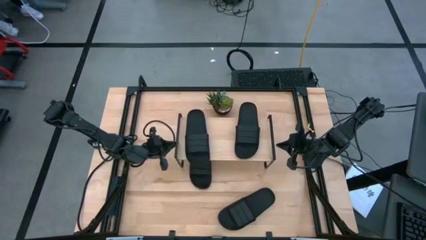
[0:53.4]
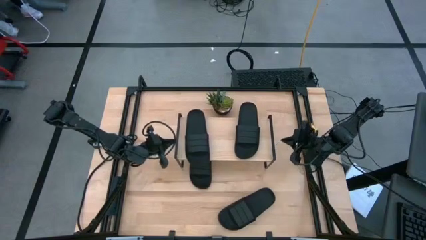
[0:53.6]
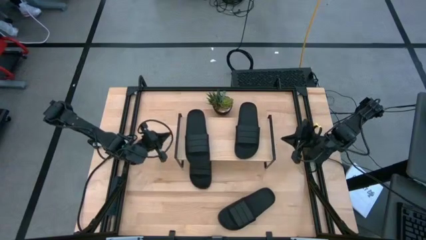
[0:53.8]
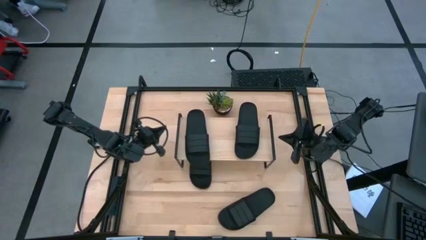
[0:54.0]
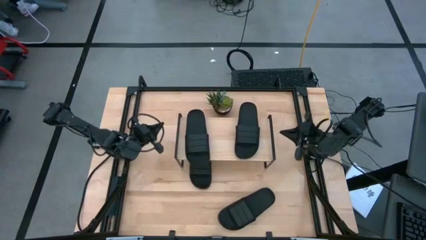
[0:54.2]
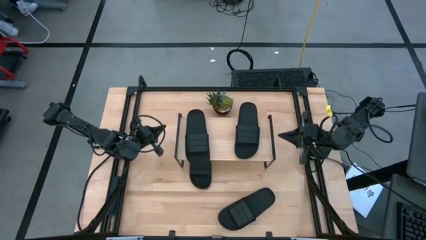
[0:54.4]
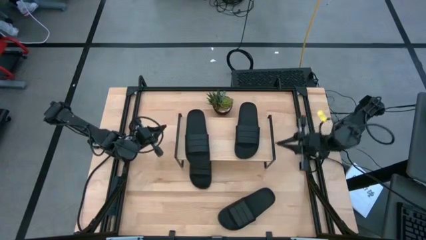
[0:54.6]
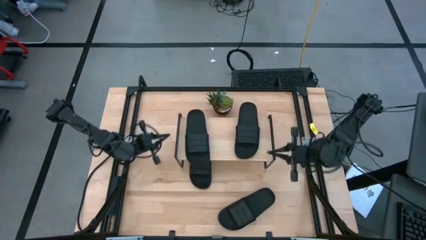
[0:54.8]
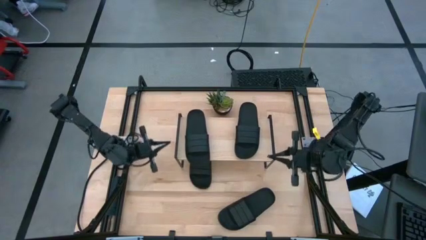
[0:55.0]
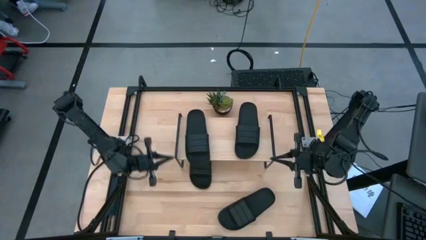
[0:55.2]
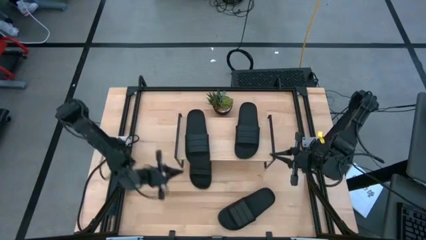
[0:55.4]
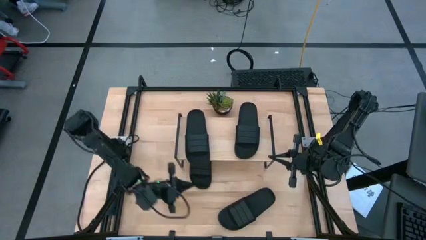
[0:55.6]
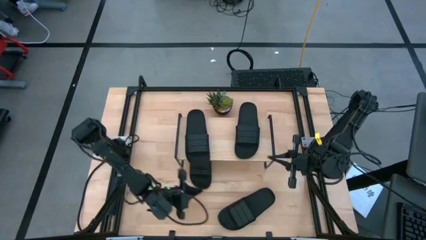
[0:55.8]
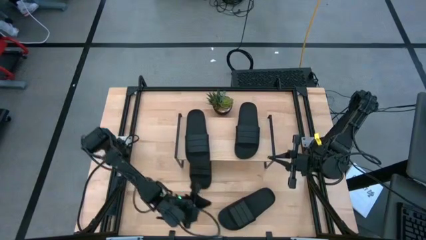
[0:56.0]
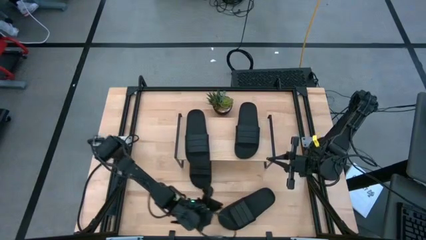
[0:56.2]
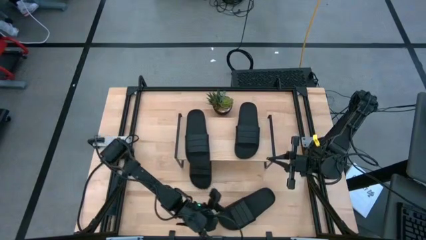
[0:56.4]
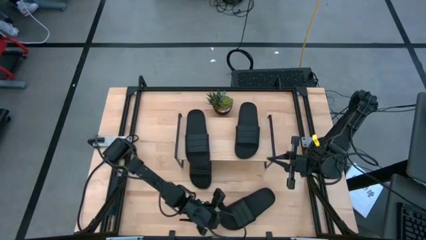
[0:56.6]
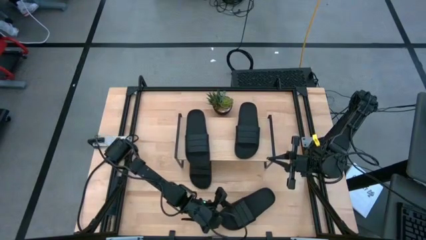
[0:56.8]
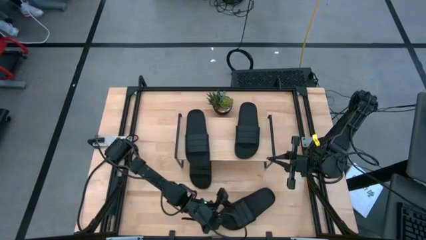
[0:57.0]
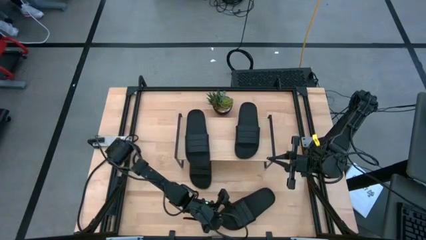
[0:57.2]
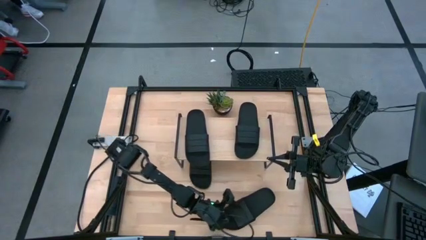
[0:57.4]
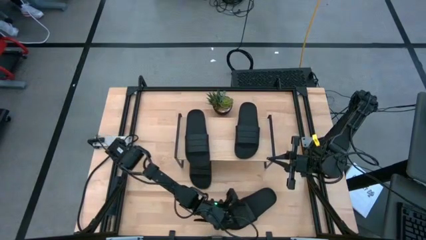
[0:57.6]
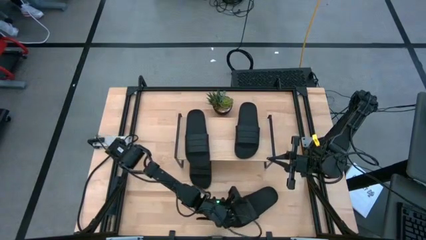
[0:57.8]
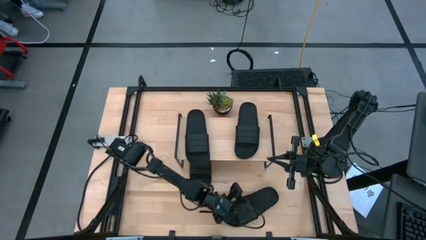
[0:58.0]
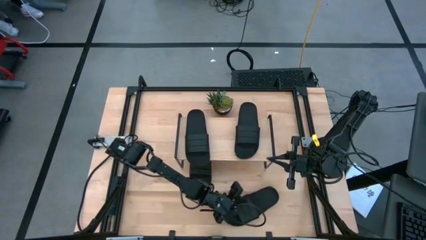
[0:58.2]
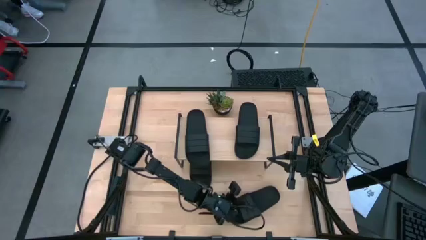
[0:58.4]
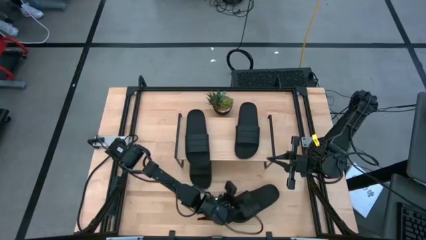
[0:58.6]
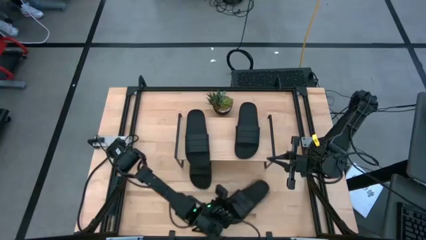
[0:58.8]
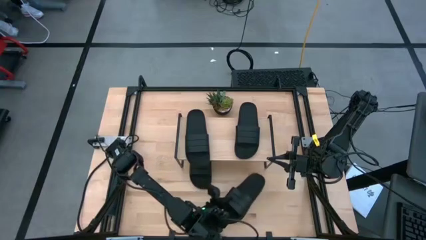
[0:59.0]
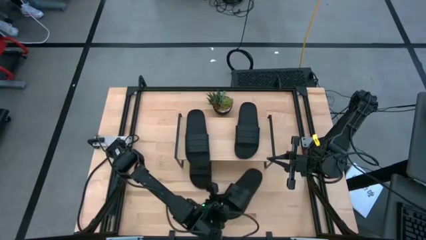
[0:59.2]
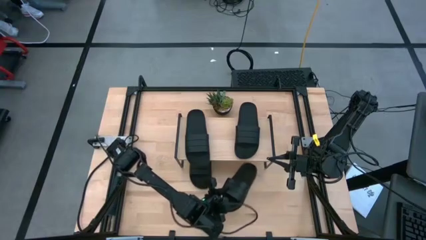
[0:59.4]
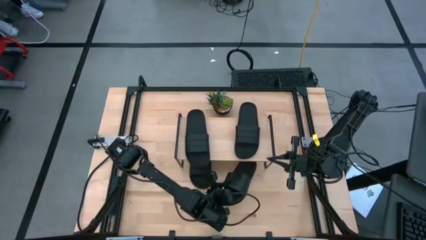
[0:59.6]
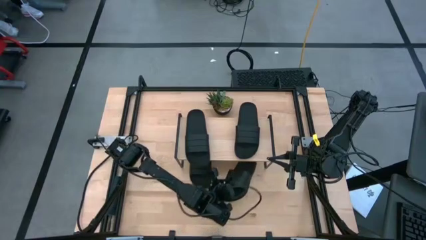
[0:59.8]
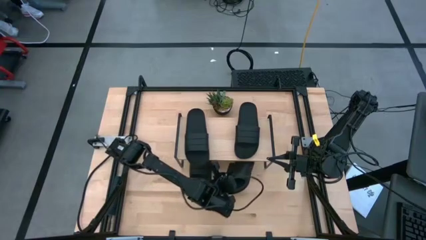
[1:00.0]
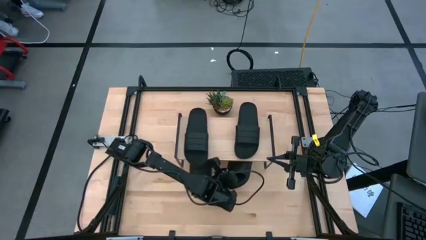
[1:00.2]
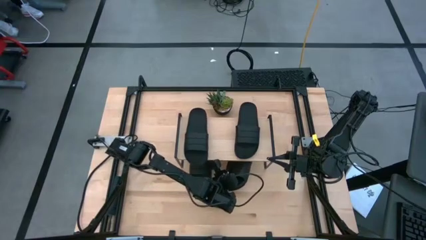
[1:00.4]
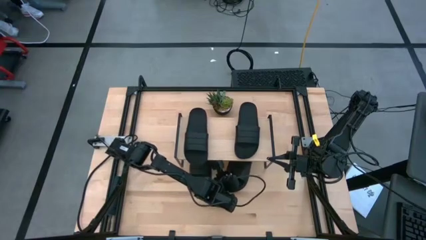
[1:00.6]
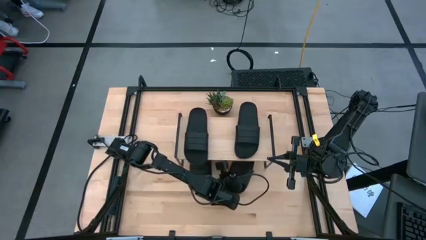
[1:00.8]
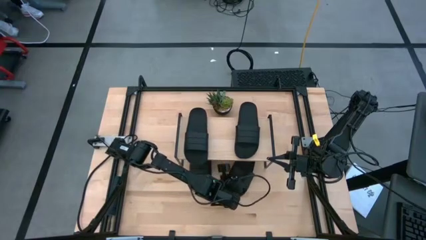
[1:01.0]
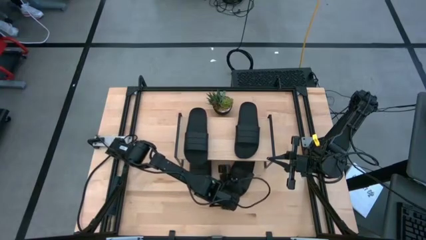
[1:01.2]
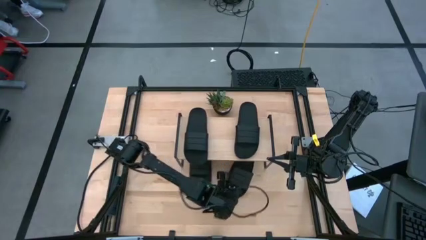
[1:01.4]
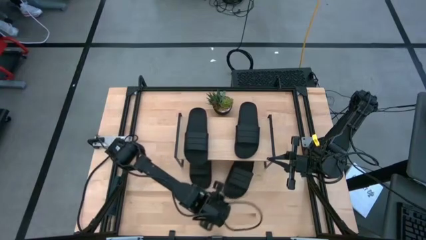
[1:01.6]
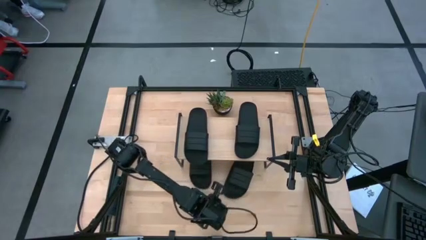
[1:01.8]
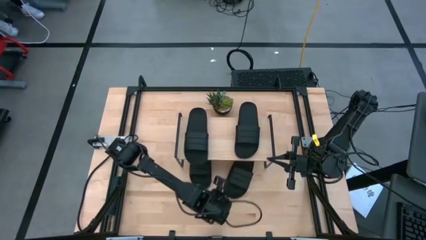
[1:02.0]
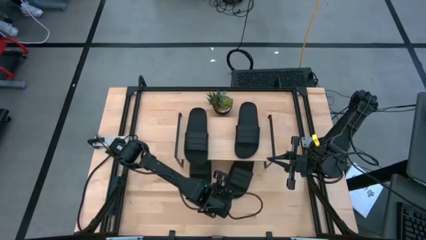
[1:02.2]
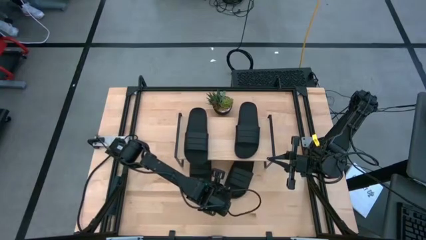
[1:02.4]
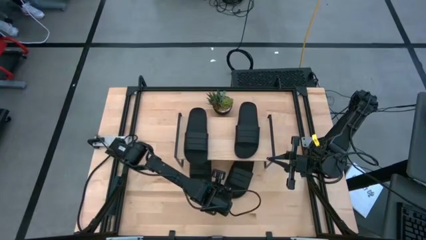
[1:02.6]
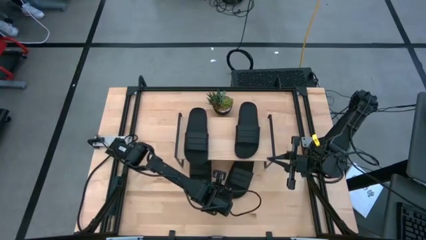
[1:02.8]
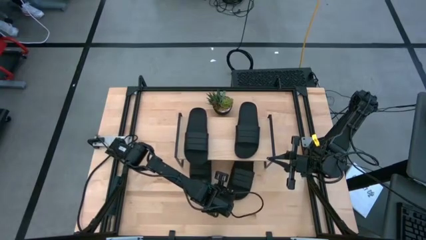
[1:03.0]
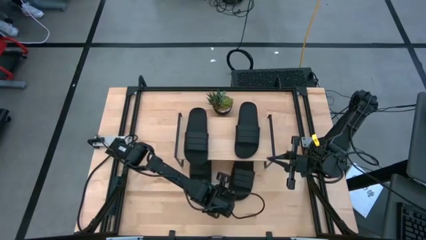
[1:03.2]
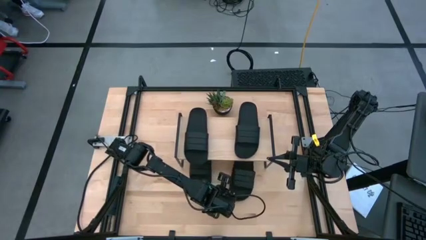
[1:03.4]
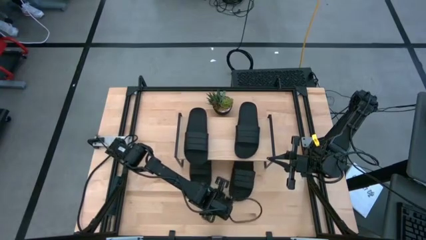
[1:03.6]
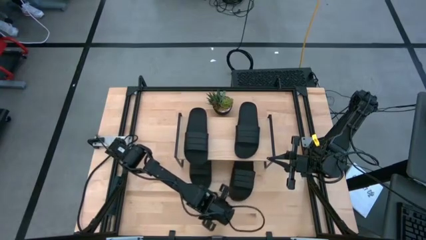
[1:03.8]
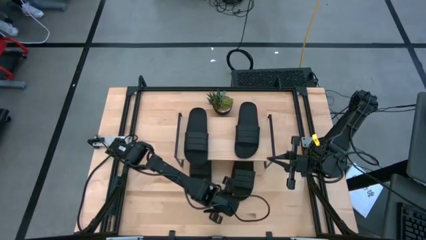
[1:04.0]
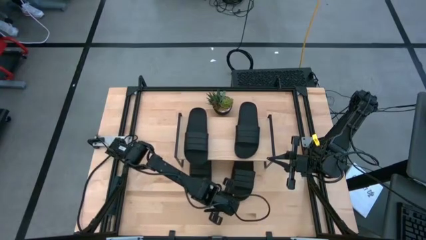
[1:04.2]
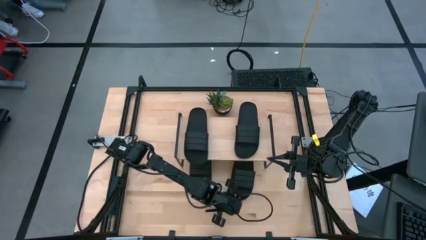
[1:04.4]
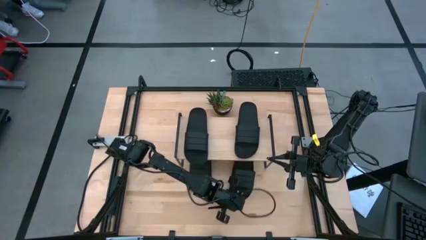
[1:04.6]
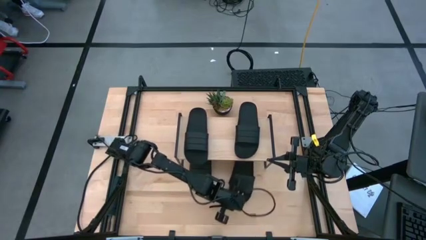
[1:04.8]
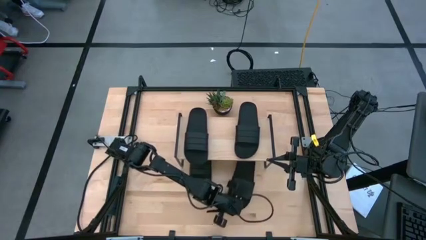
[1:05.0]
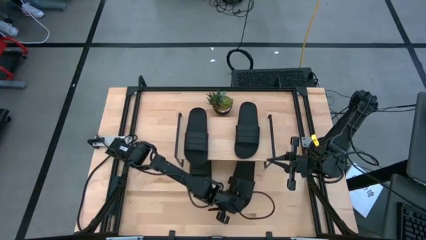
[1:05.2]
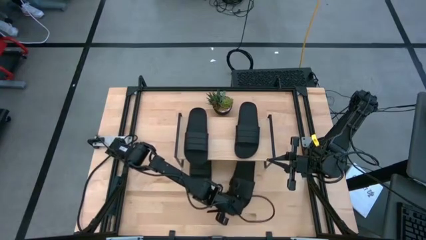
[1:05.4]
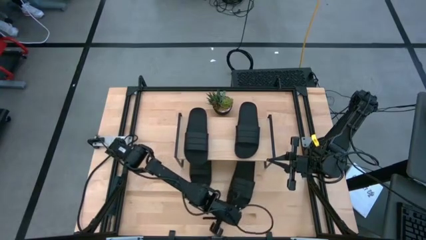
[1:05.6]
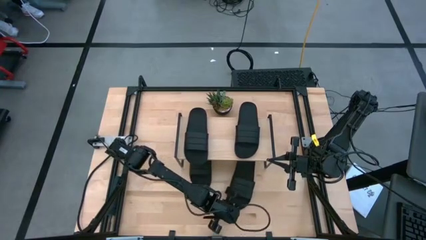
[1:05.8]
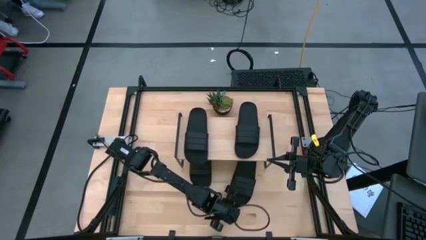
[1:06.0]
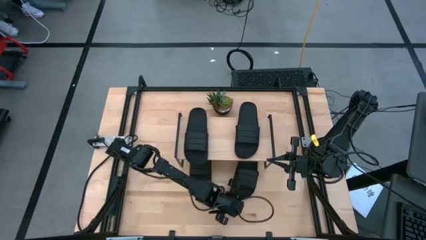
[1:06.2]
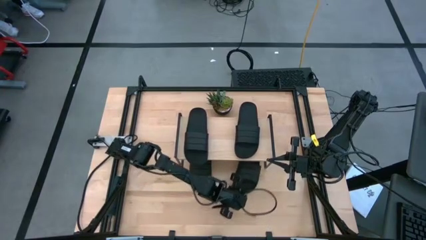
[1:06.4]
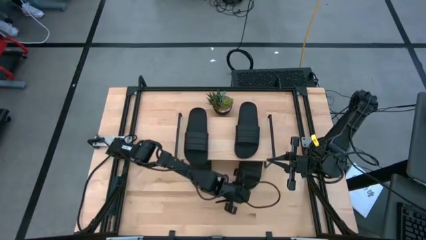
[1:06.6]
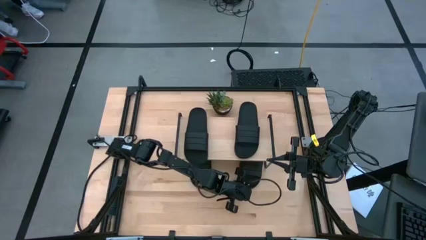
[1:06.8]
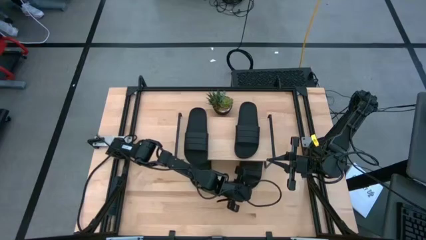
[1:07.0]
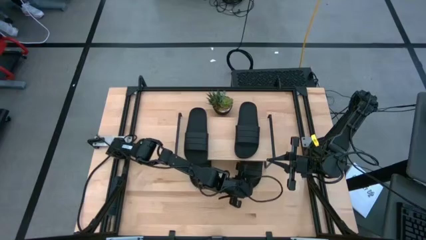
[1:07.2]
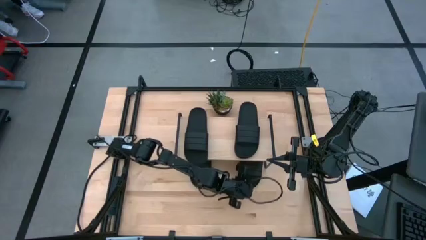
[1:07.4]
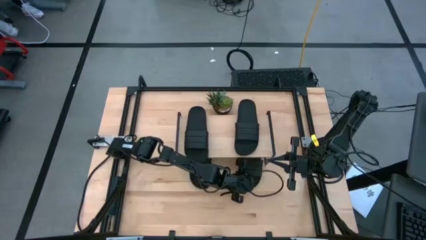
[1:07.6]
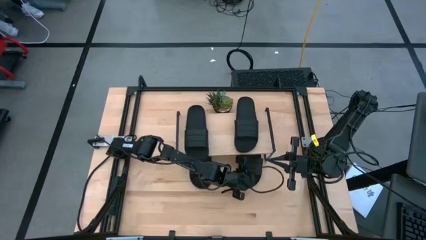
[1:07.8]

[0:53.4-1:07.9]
Task: Pick and place slides into the shelf
Put the black slide under the shelf
